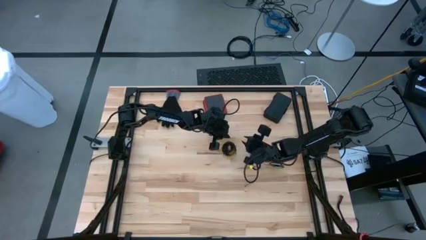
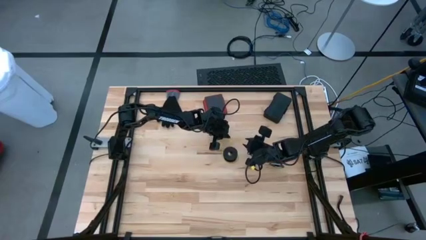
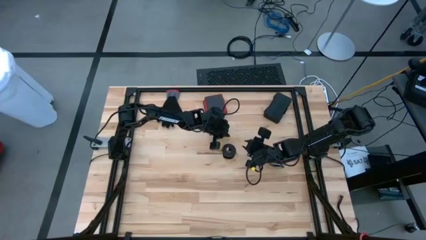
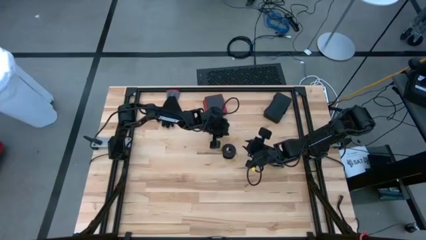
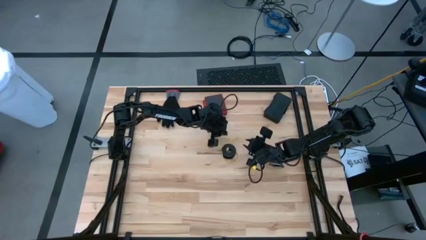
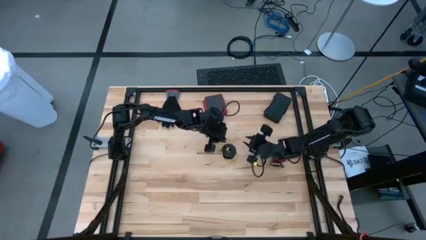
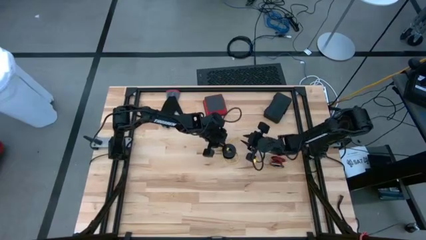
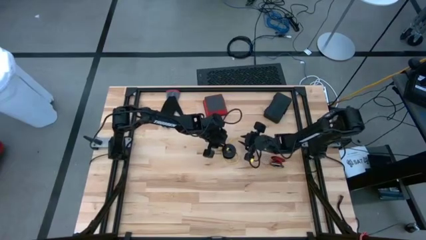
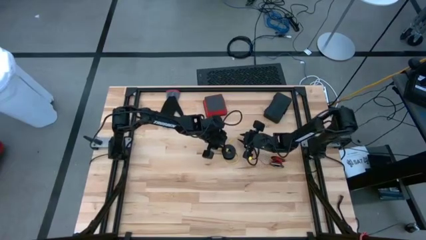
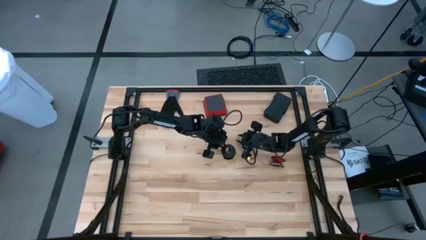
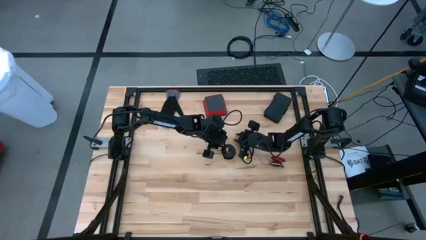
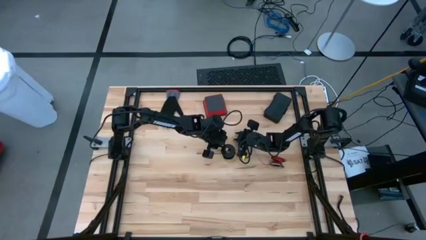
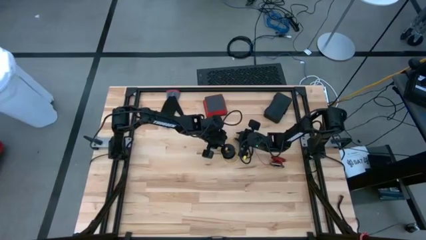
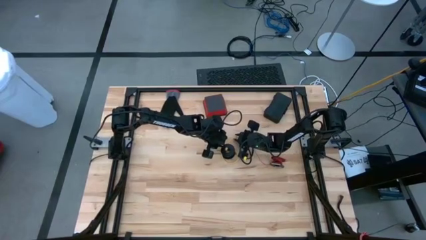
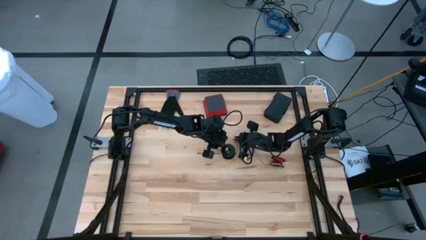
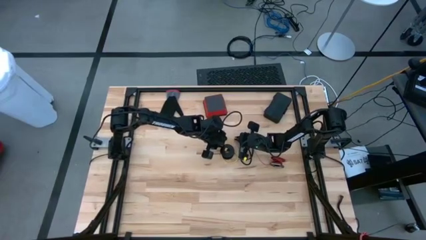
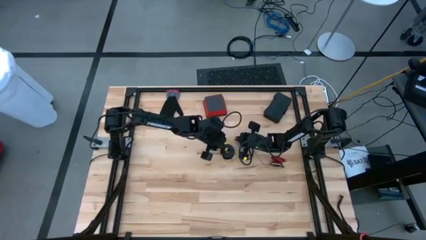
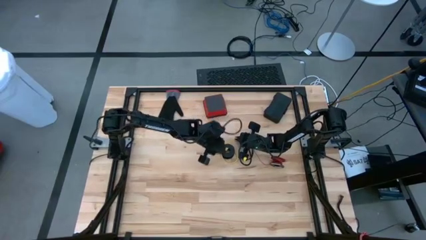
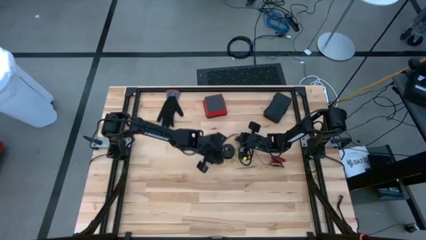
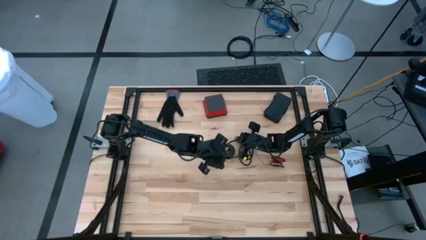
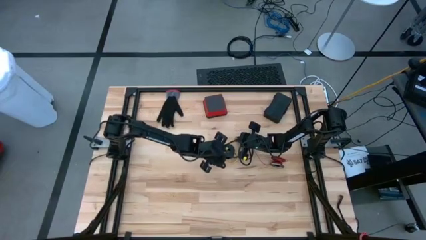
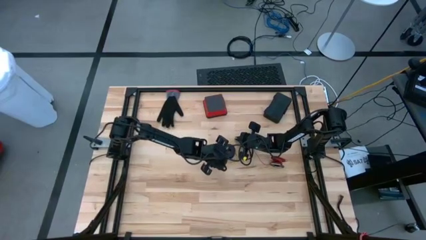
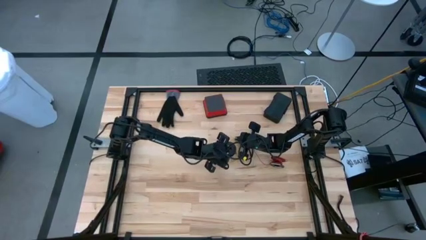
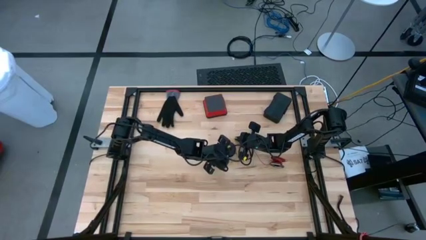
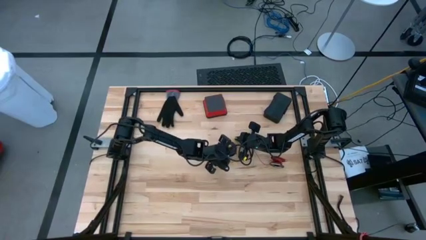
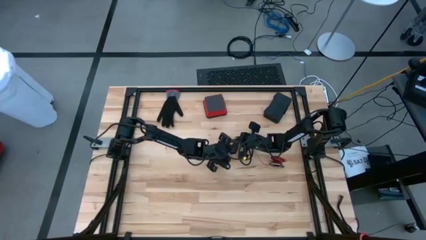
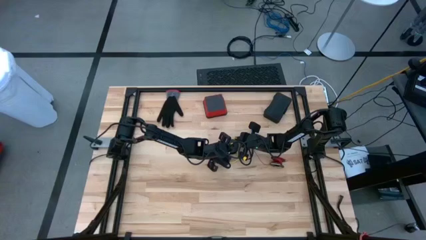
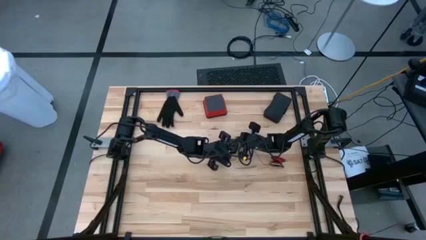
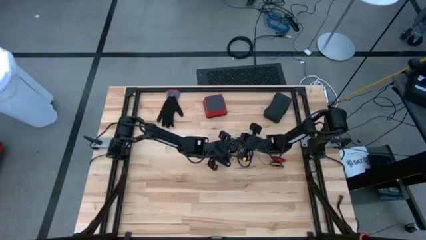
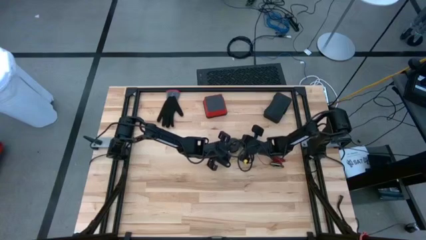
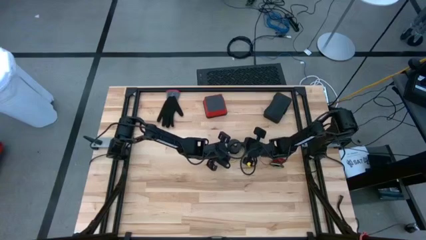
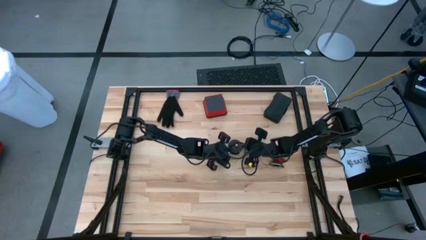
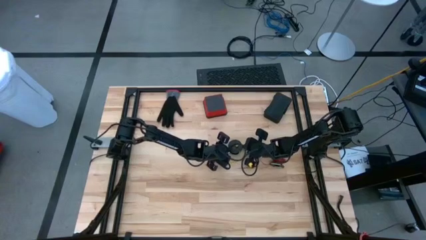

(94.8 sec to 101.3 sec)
Task: Coil cords
Coil the yellow wire onto the spool

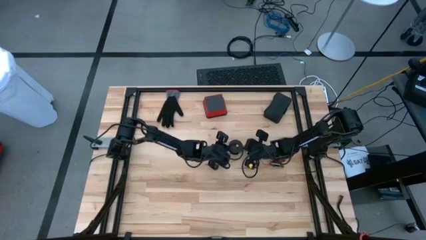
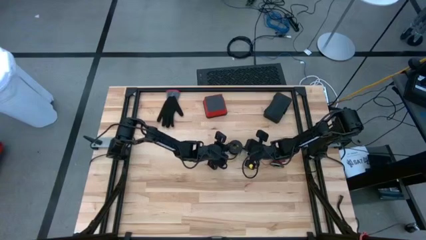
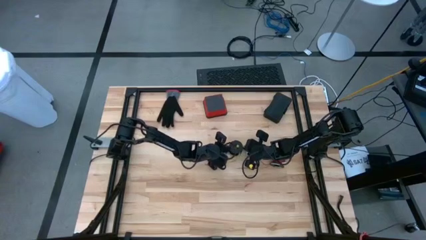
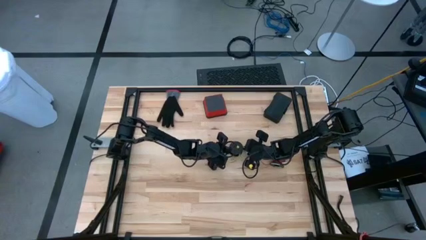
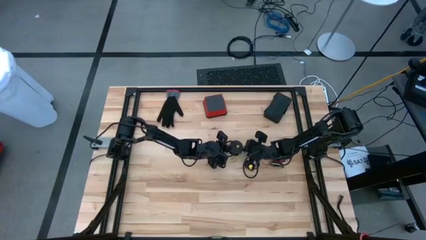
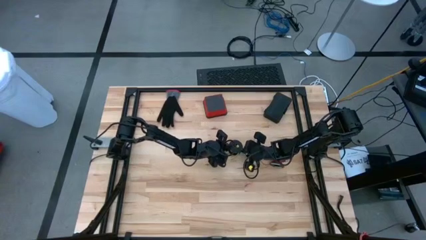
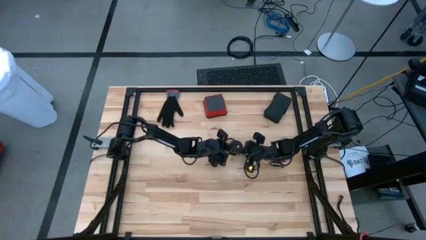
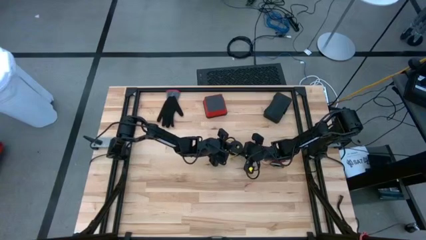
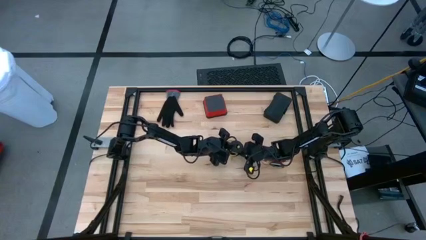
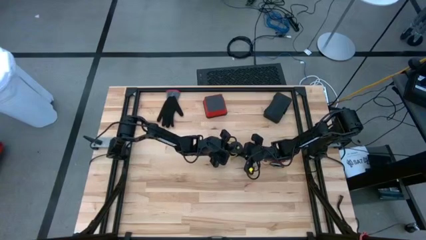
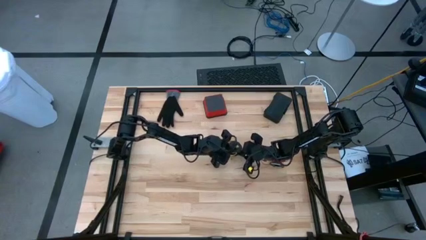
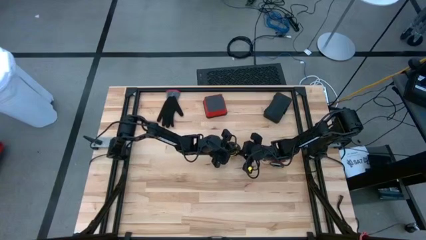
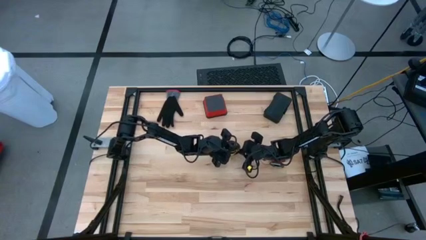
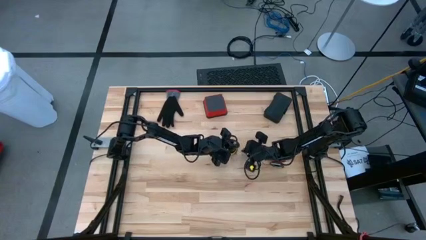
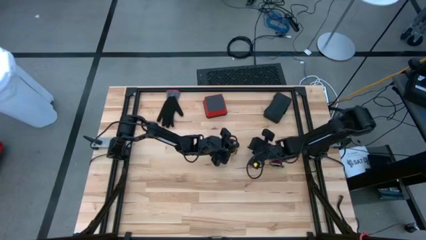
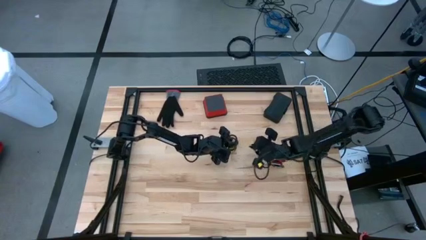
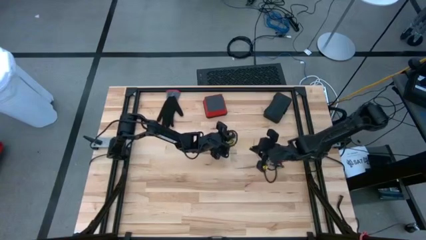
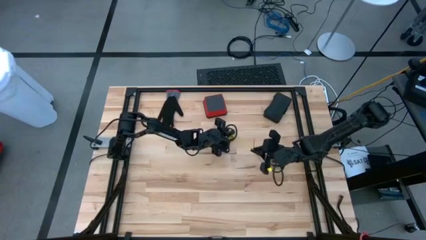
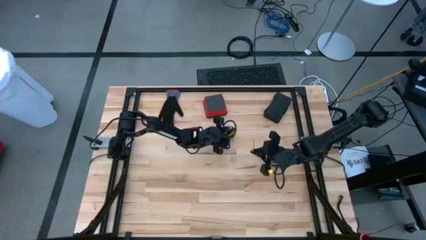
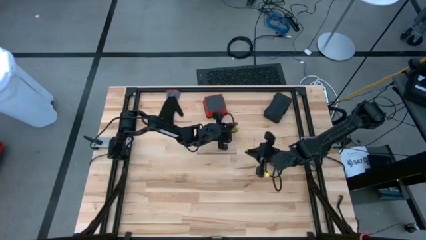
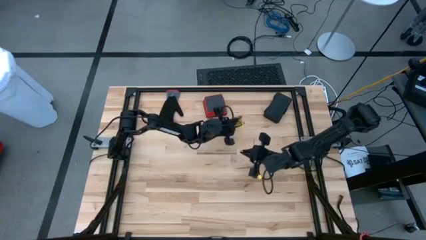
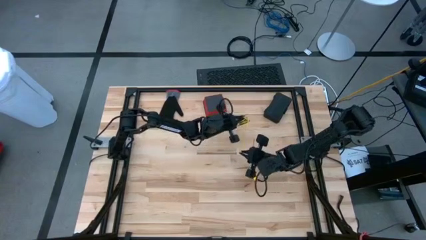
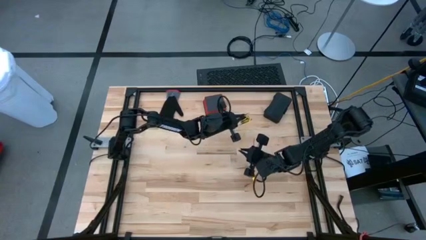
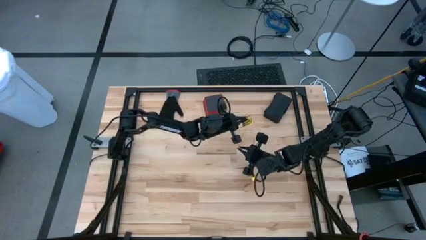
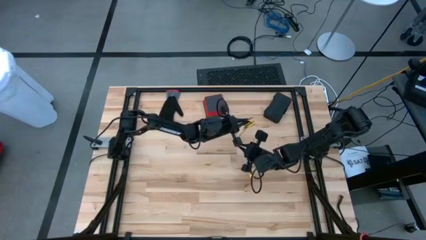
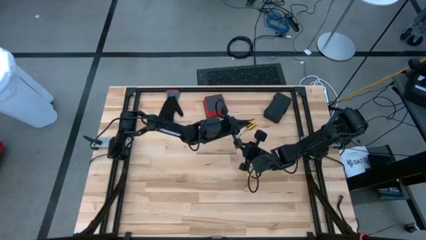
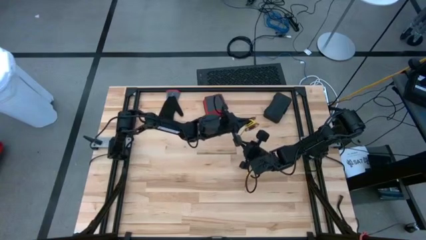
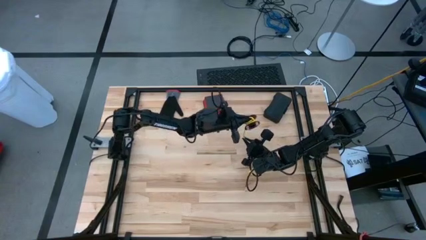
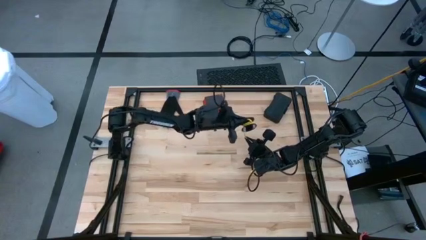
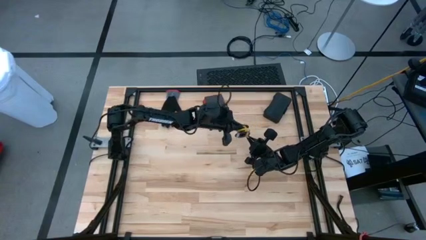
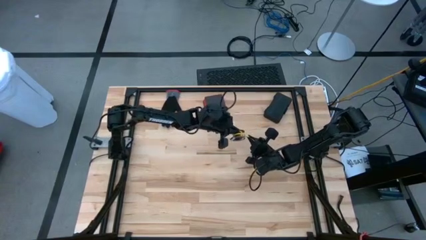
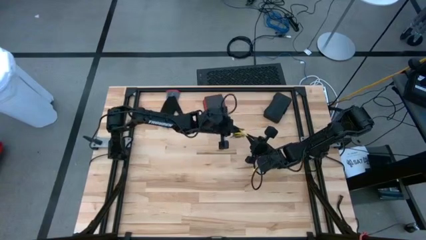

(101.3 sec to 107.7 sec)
Coil the yellow wire onto the spool

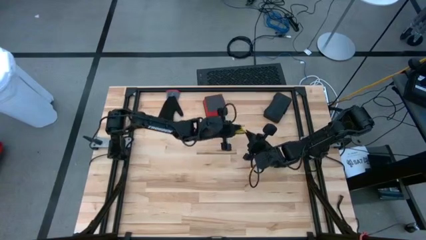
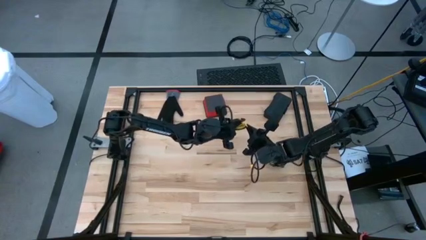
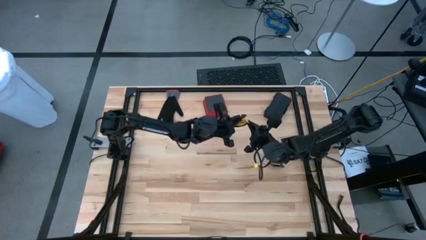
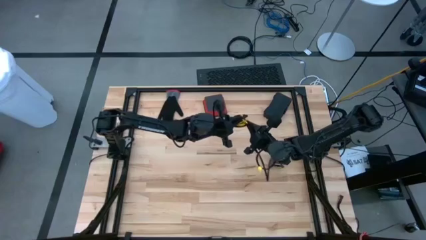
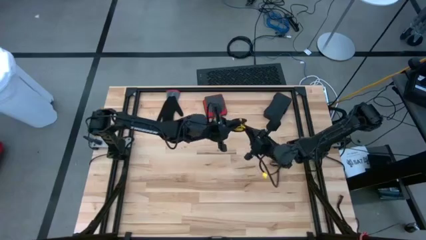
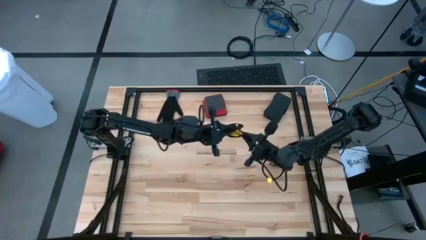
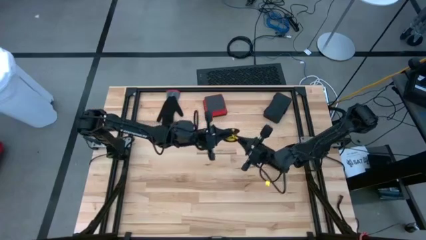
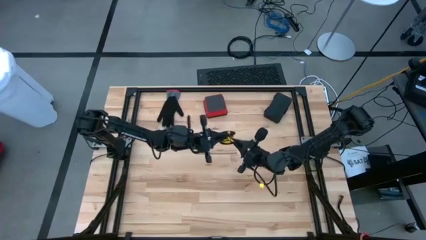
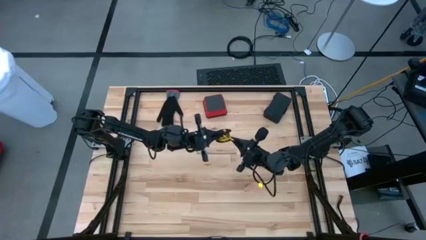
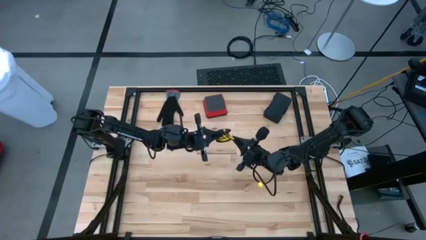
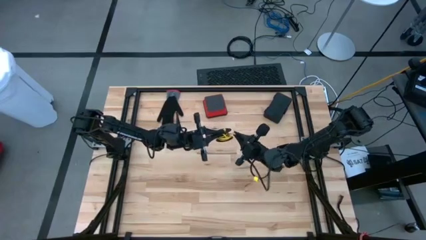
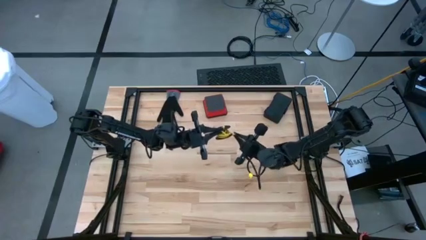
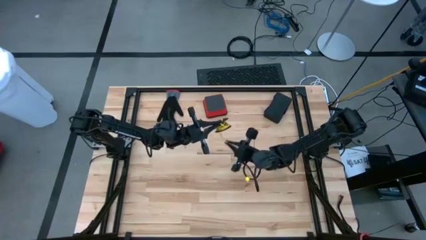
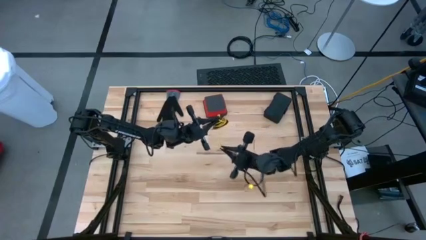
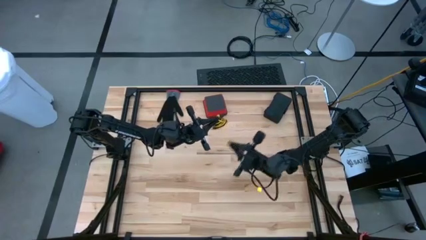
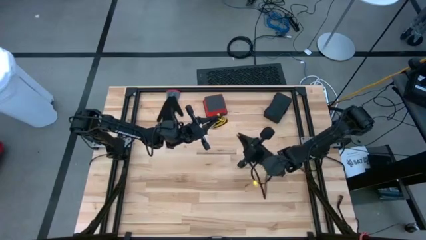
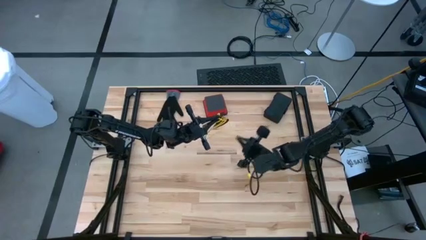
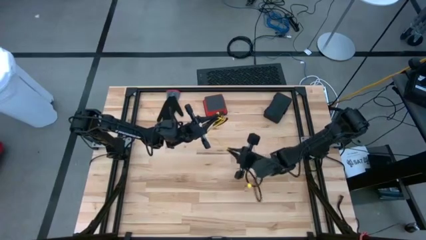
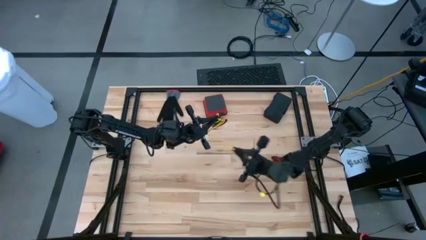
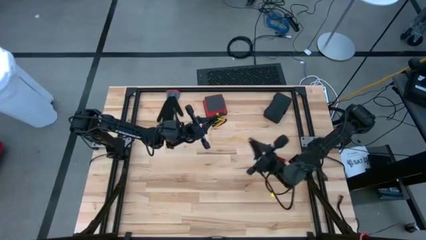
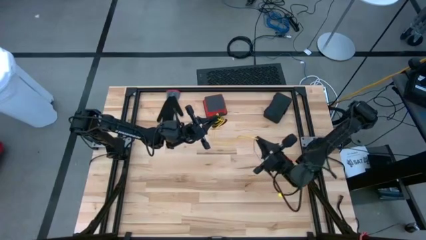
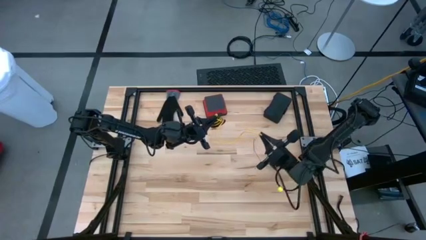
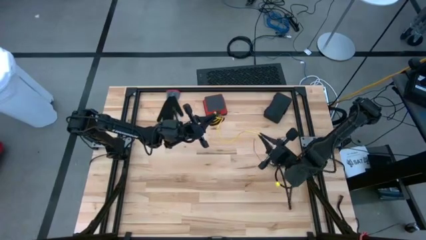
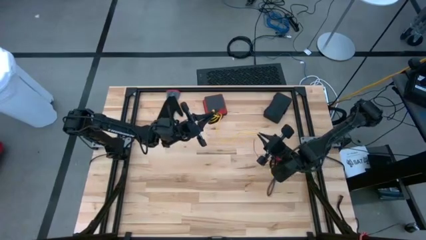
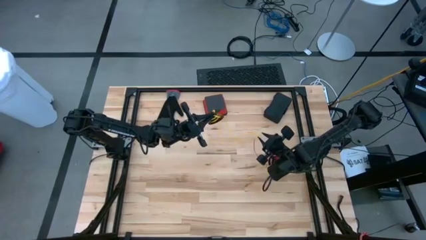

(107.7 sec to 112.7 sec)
Uncoil the yellow wire from the spool
